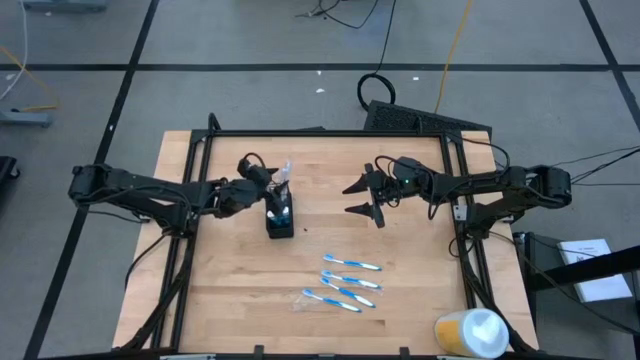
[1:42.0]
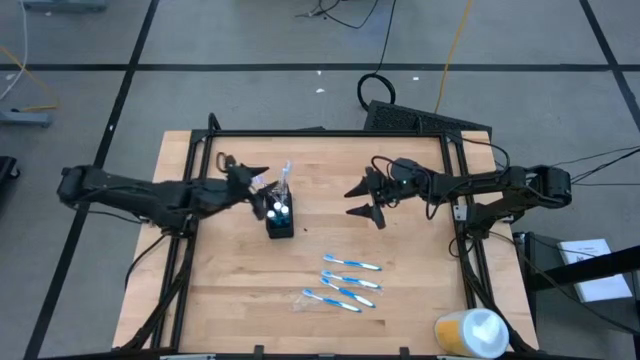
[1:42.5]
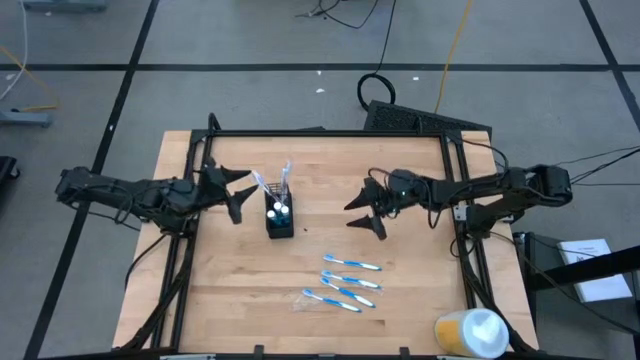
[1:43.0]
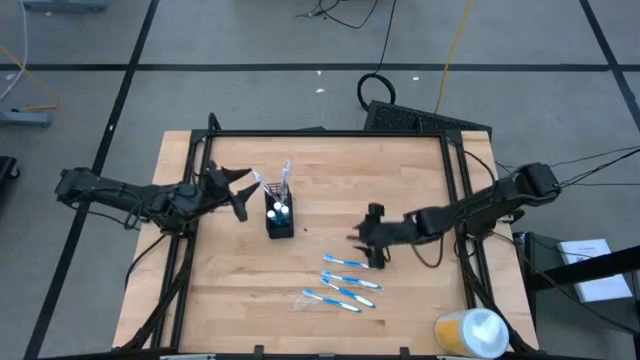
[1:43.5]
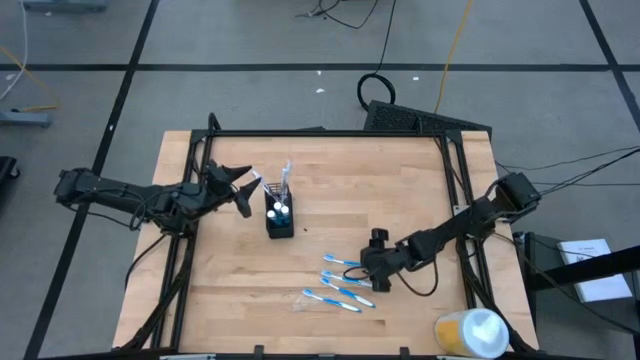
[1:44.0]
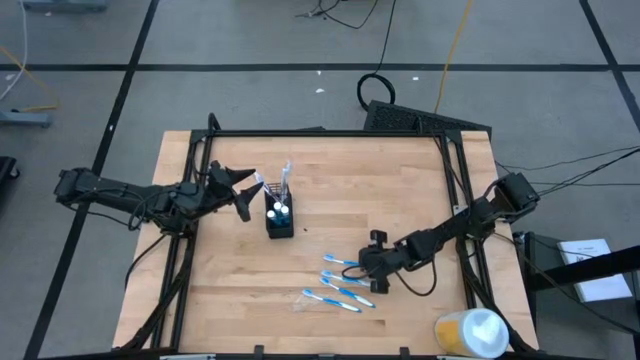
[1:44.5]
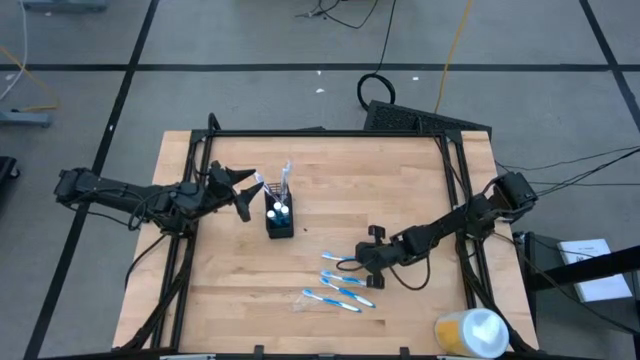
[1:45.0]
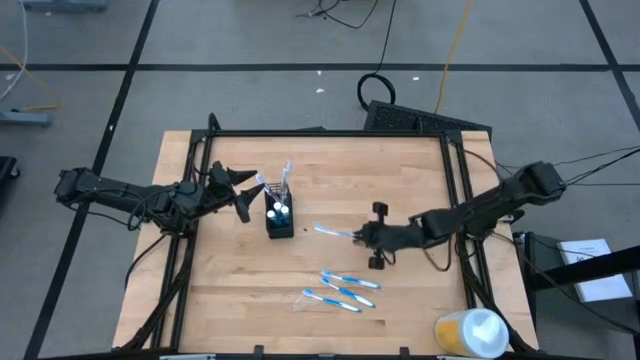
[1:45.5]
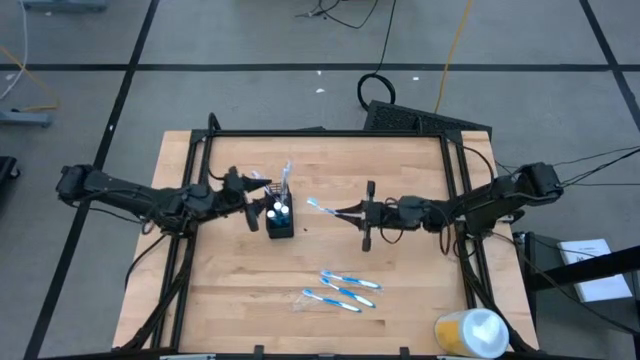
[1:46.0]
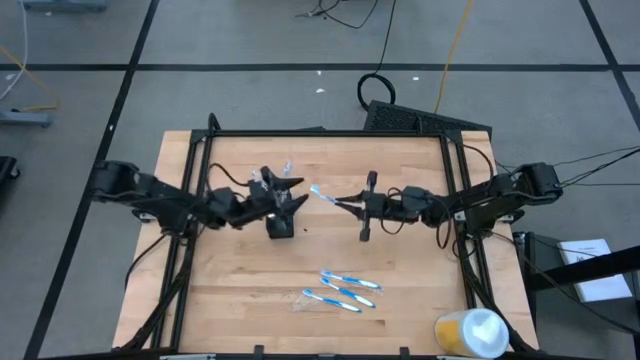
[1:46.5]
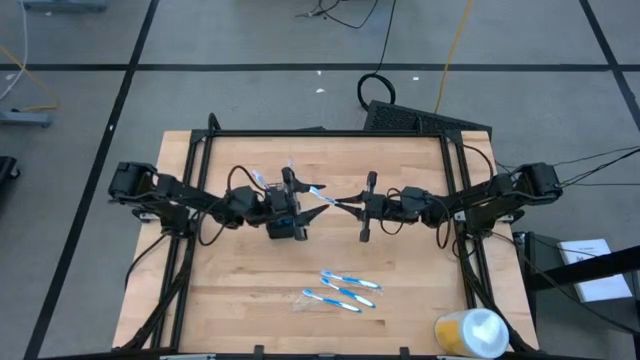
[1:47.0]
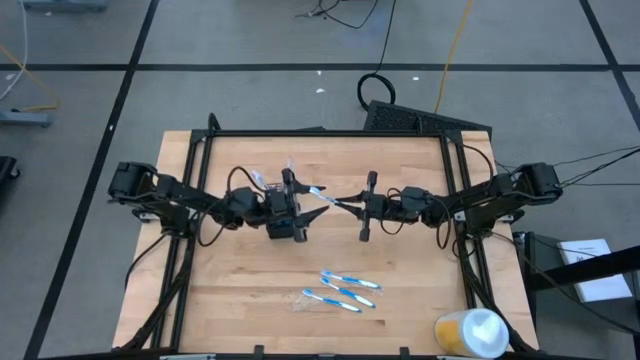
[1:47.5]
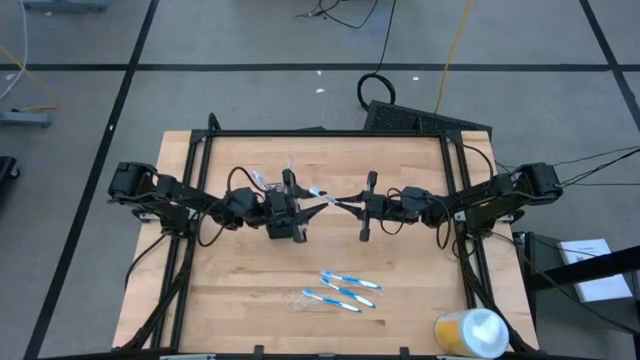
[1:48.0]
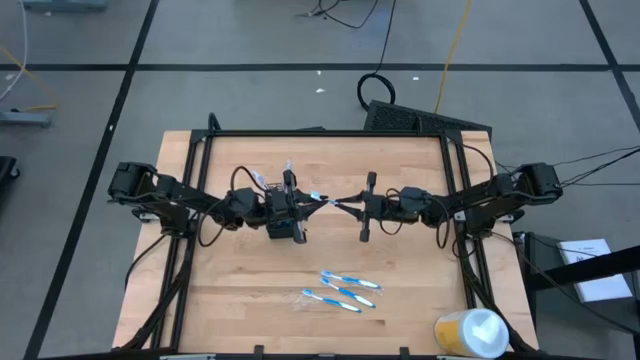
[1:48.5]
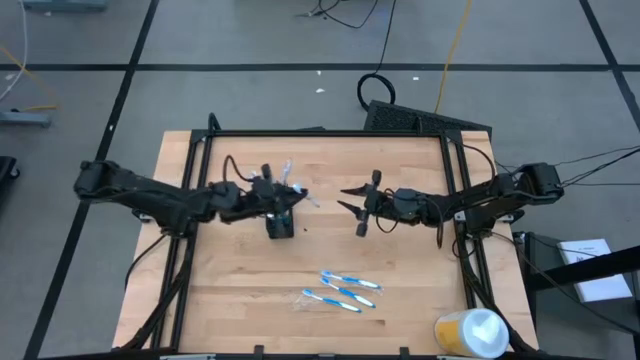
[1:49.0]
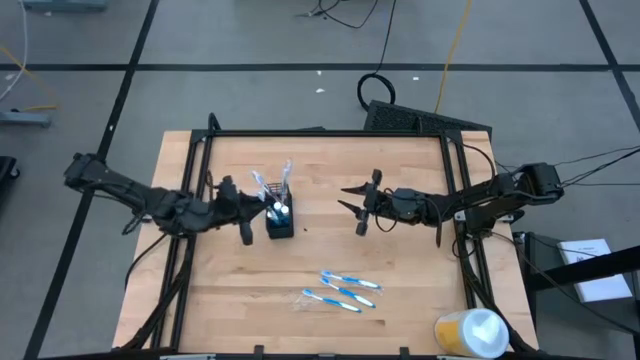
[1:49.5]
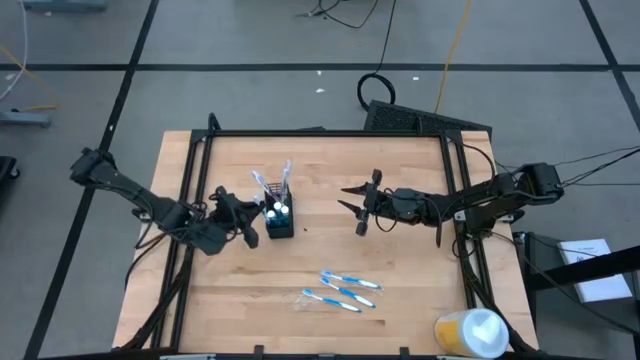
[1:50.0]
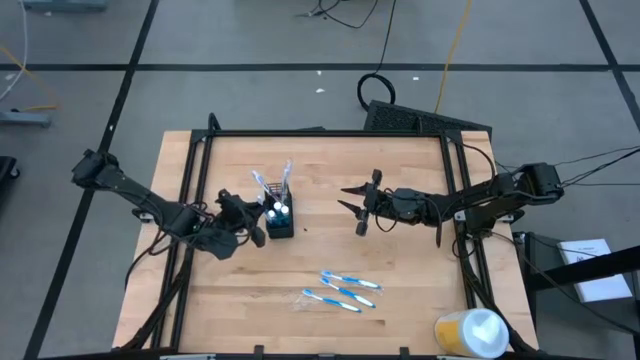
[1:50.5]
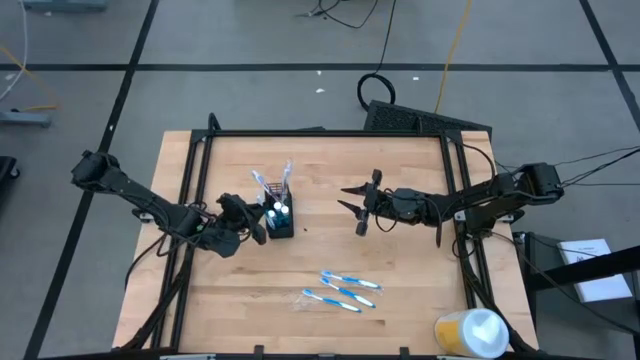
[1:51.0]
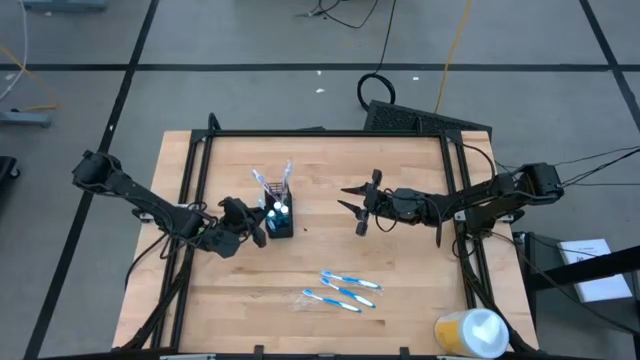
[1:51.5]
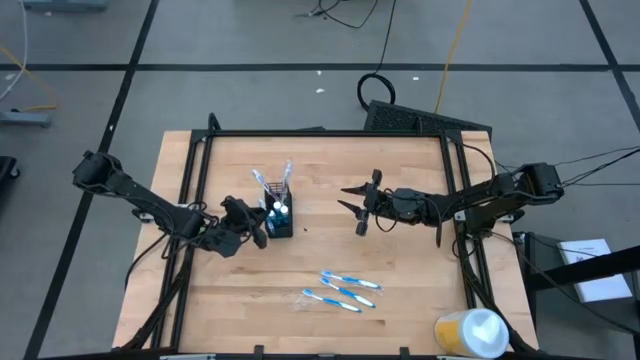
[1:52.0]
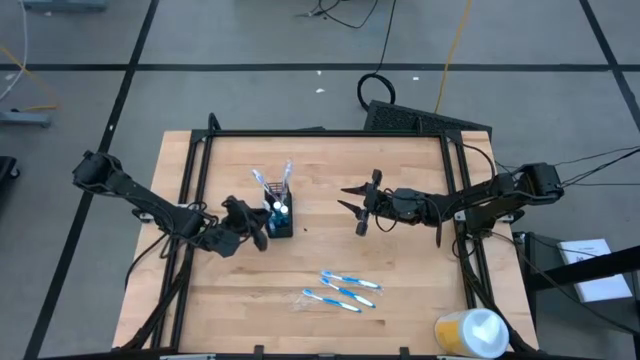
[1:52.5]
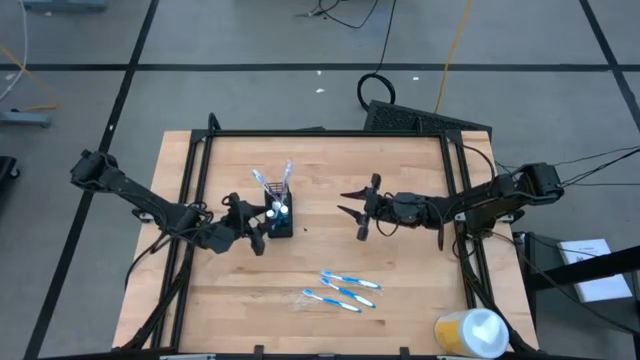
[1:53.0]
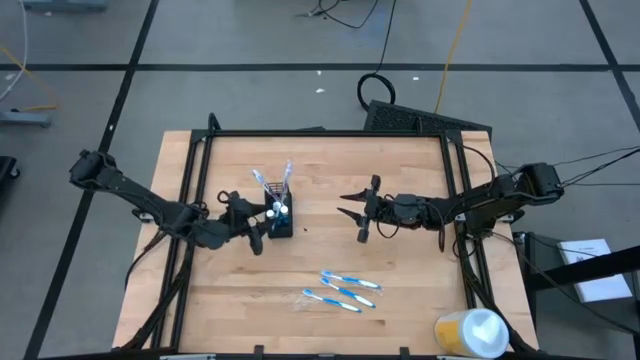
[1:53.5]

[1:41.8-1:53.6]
Task: Pick & Place toothbrushing station
Put the blue toothbrush into the black organizer

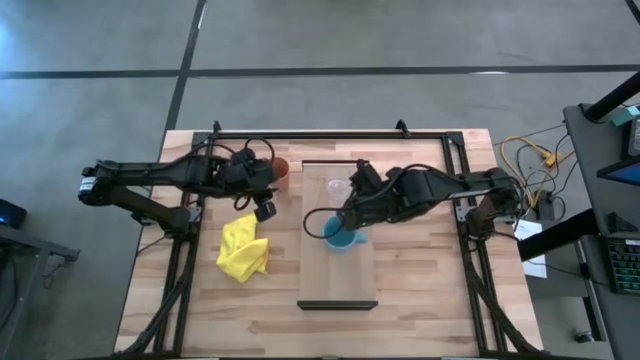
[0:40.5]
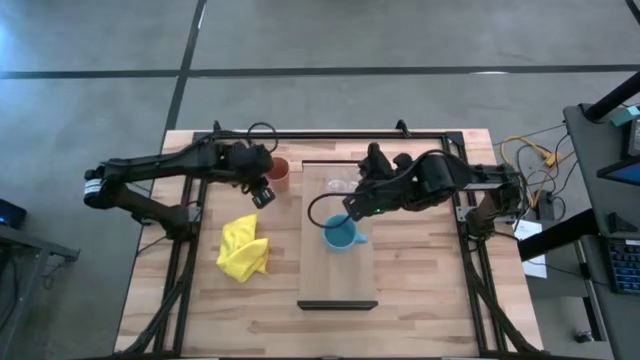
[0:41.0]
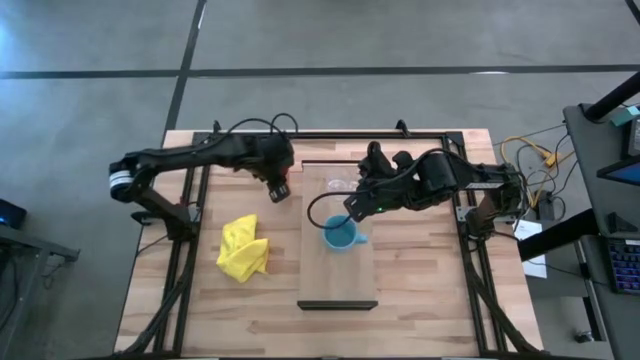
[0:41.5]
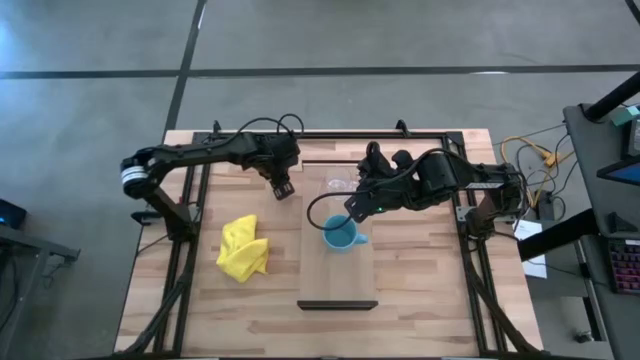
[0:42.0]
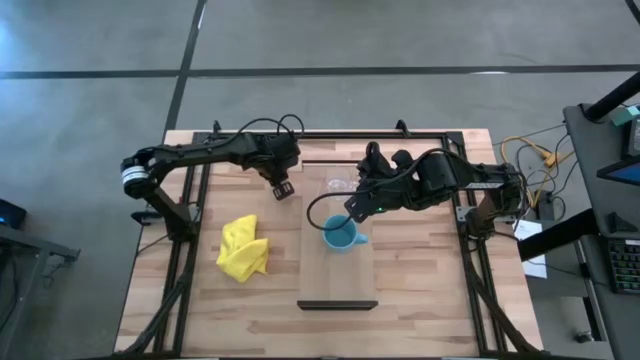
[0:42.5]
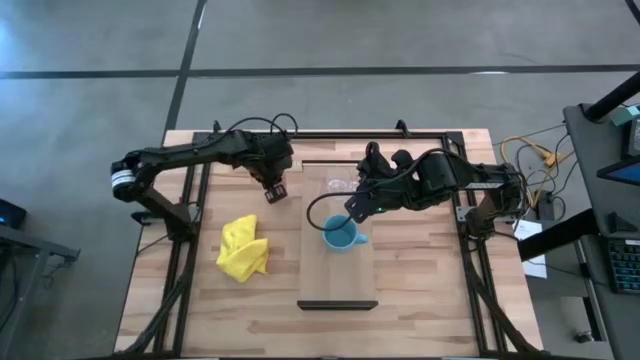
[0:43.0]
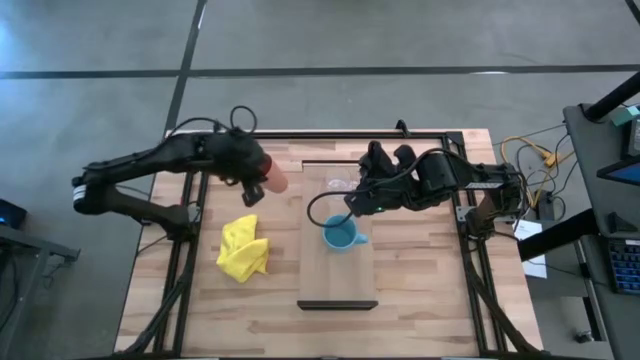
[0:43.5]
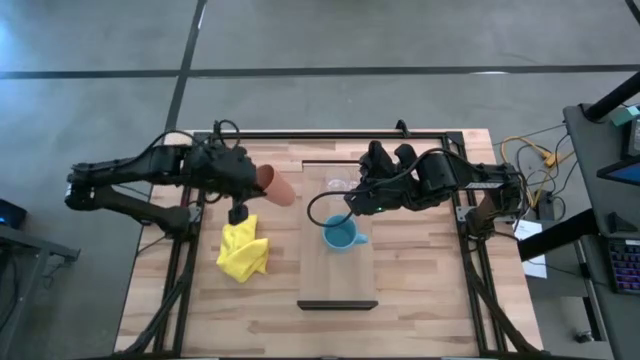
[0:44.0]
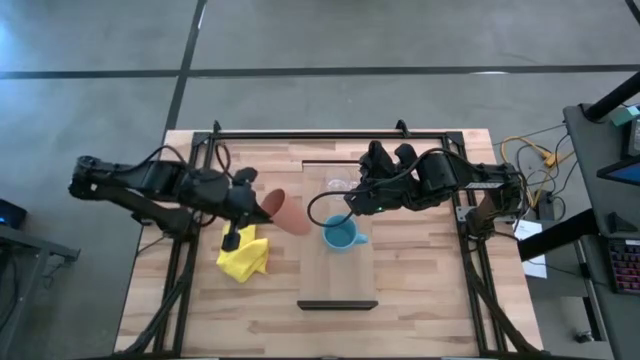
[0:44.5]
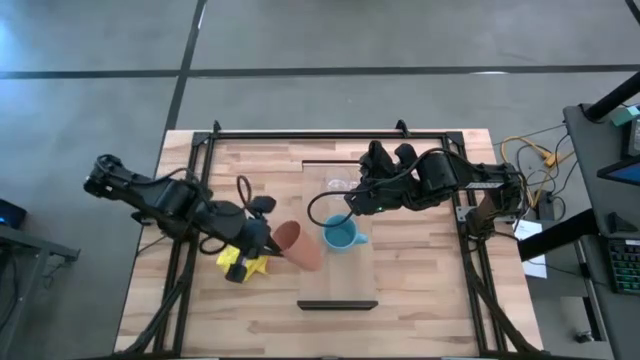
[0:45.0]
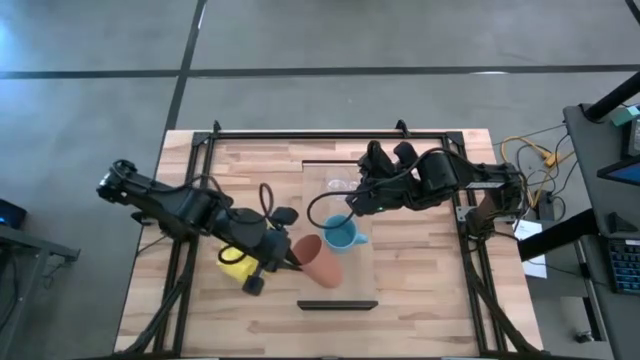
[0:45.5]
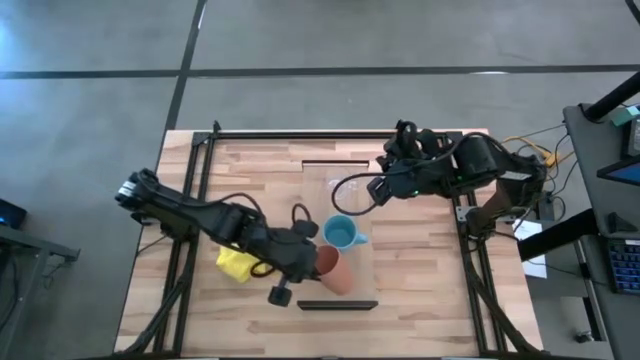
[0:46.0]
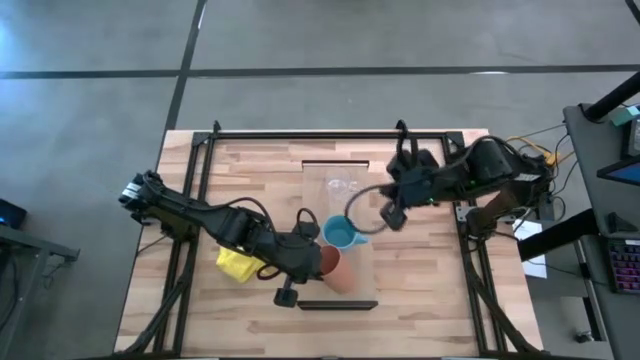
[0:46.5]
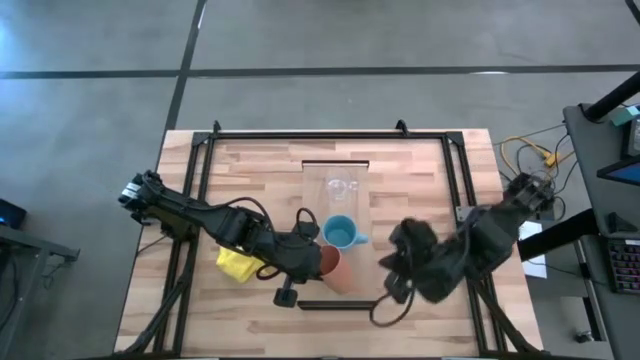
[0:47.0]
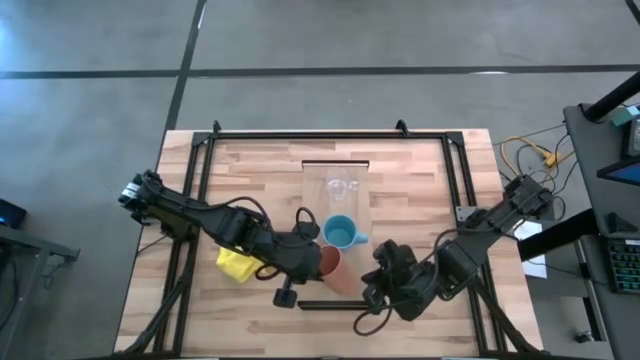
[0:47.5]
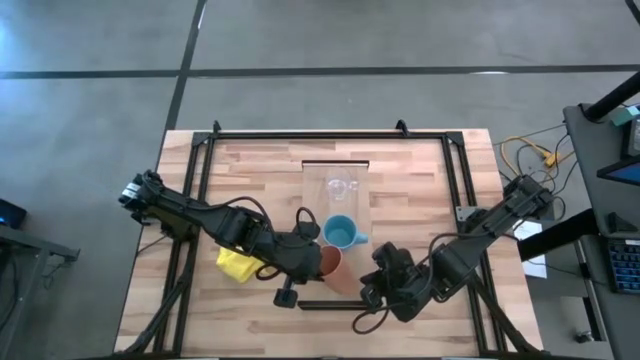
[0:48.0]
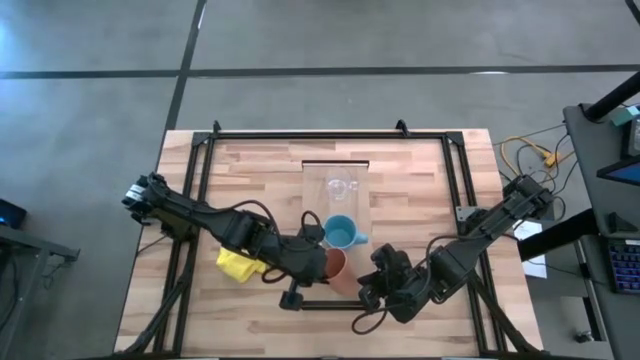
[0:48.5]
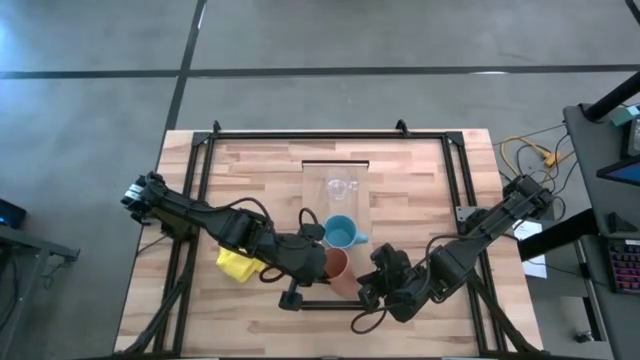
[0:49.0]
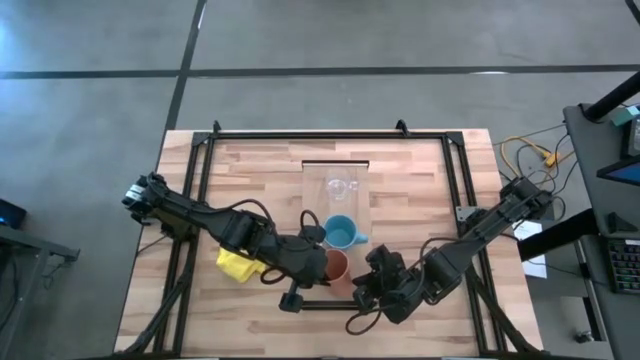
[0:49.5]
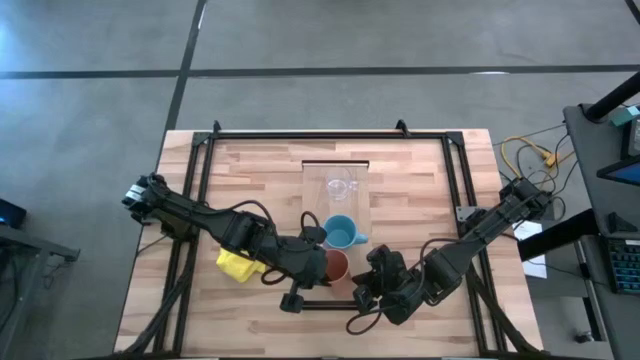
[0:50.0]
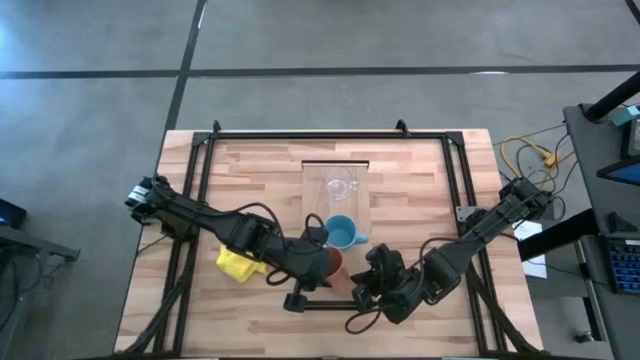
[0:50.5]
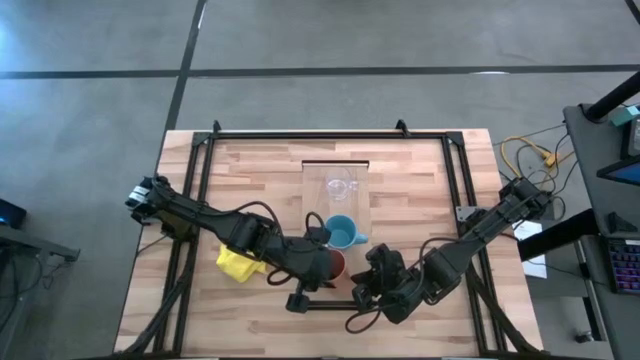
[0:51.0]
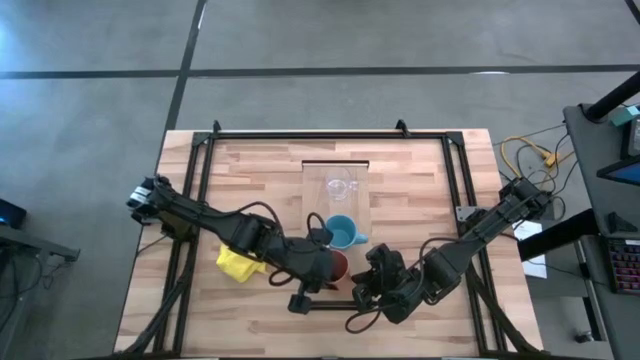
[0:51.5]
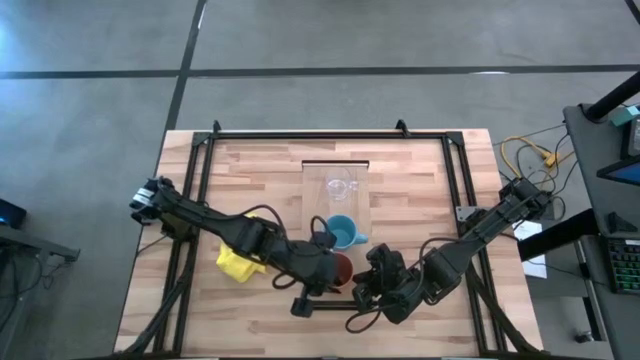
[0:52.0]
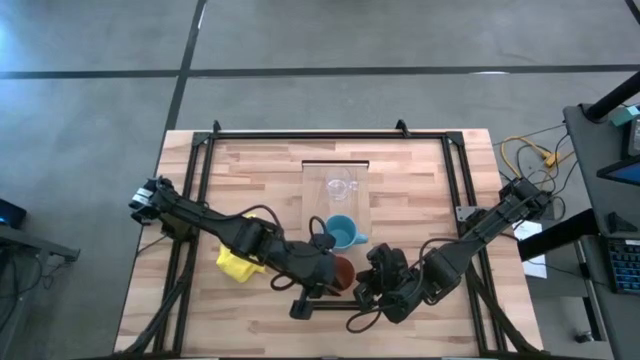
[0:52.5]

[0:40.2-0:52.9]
Task: Stack small to large cups/mugs on shelf
Put the orange cup on the shelf
